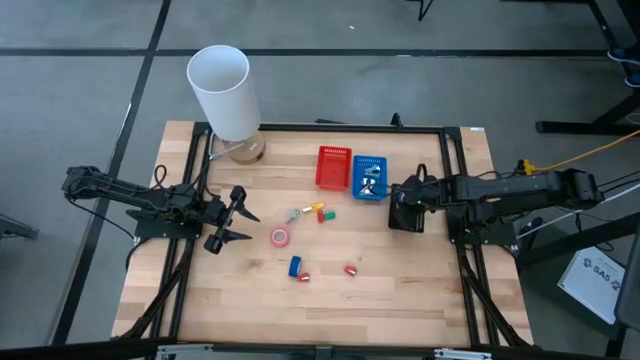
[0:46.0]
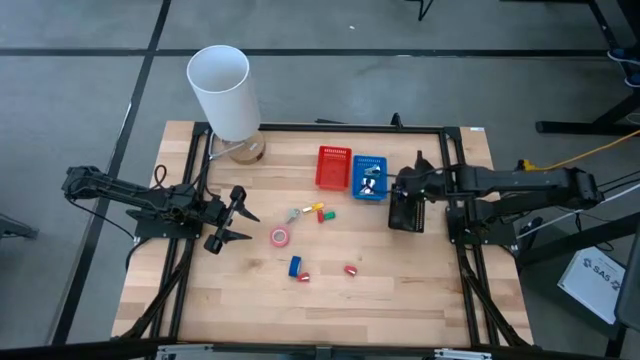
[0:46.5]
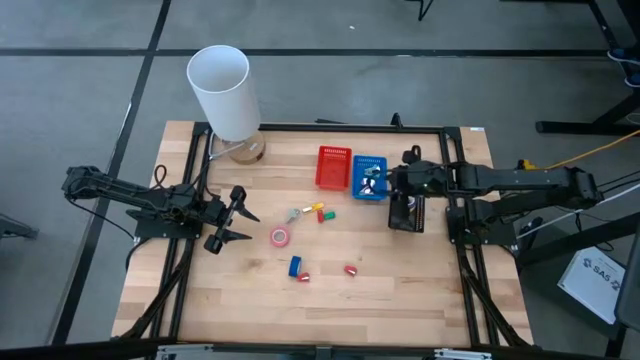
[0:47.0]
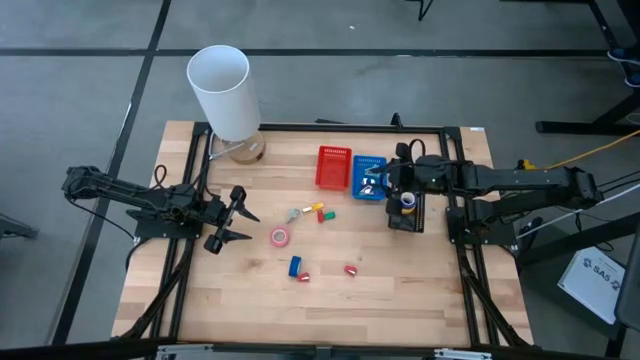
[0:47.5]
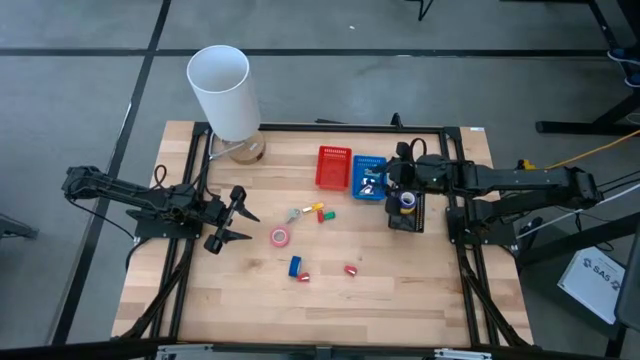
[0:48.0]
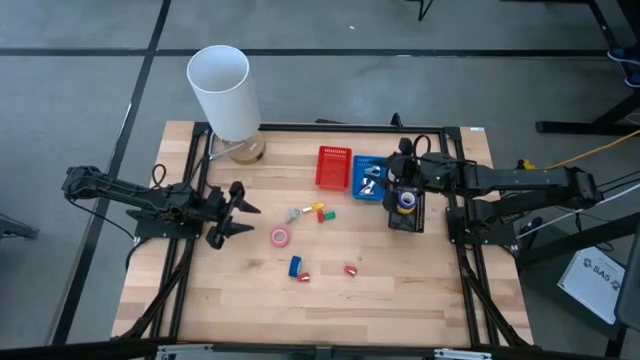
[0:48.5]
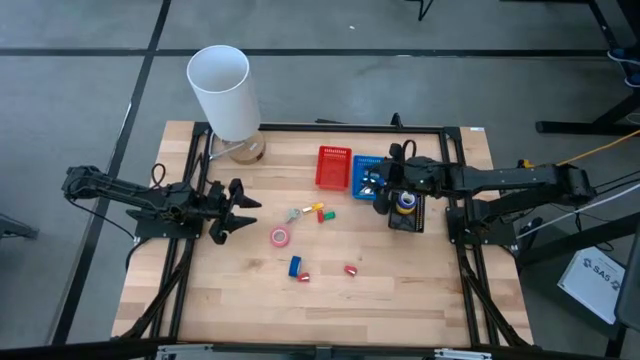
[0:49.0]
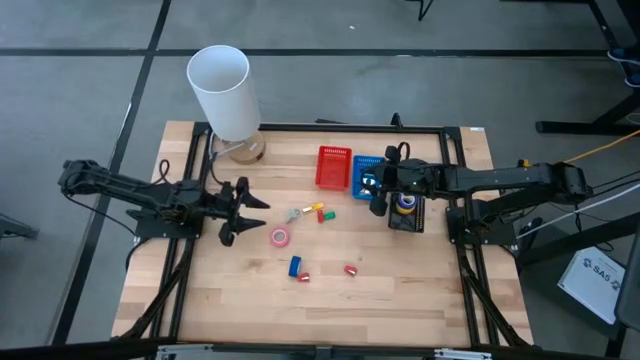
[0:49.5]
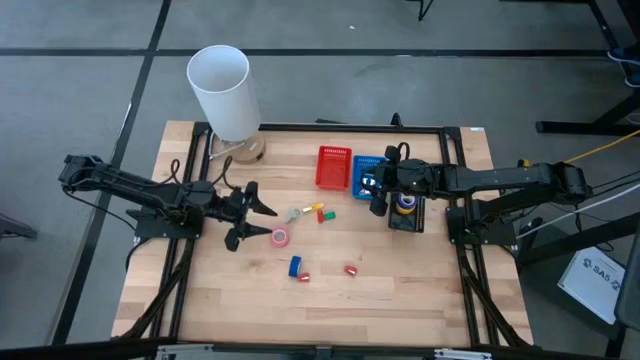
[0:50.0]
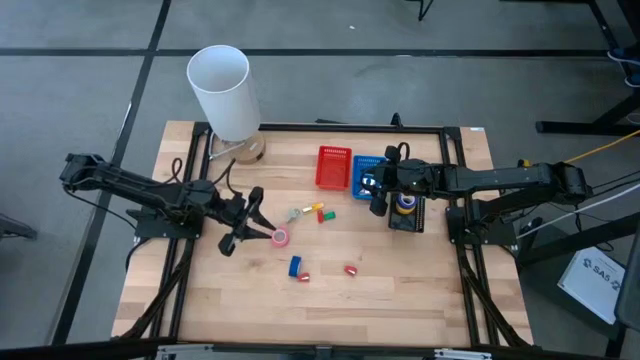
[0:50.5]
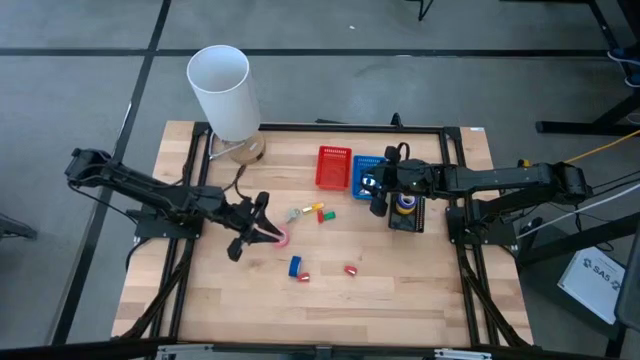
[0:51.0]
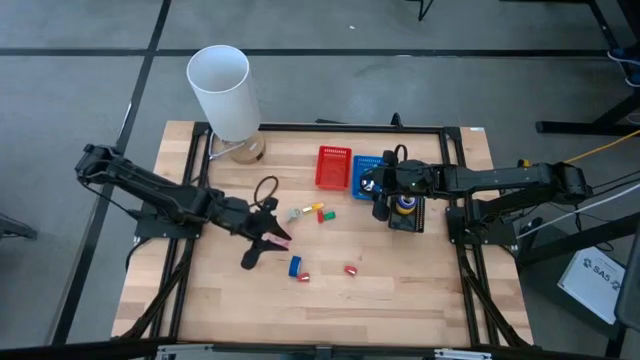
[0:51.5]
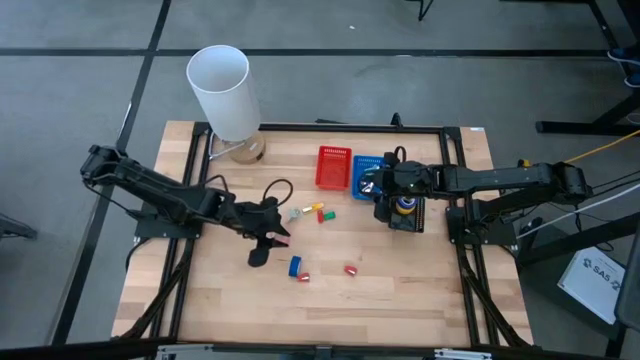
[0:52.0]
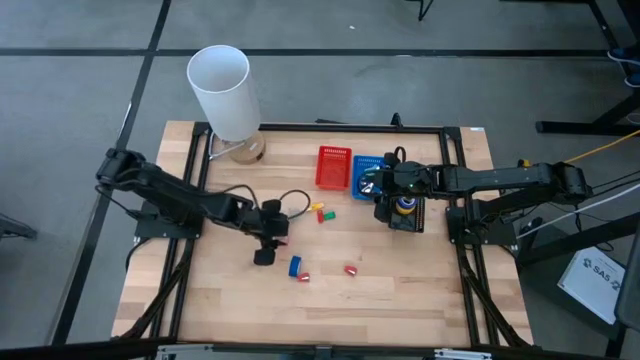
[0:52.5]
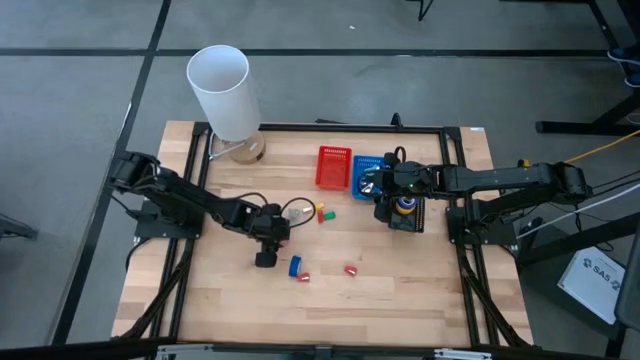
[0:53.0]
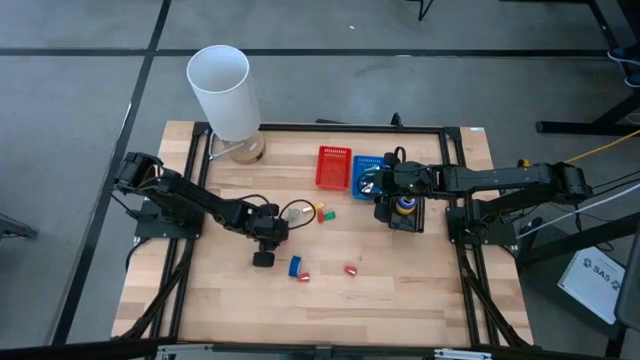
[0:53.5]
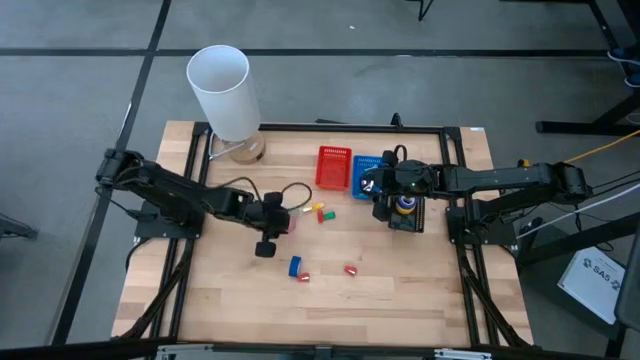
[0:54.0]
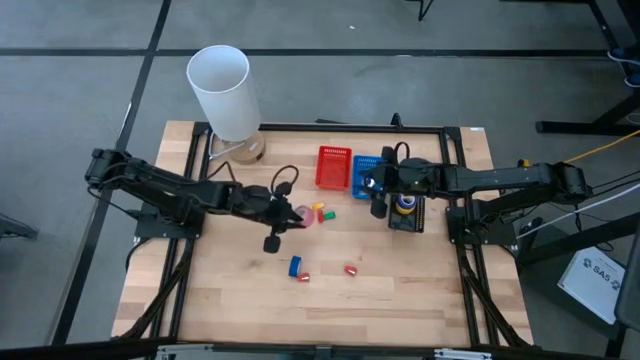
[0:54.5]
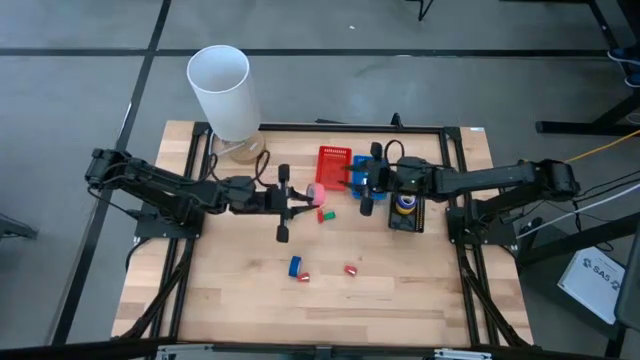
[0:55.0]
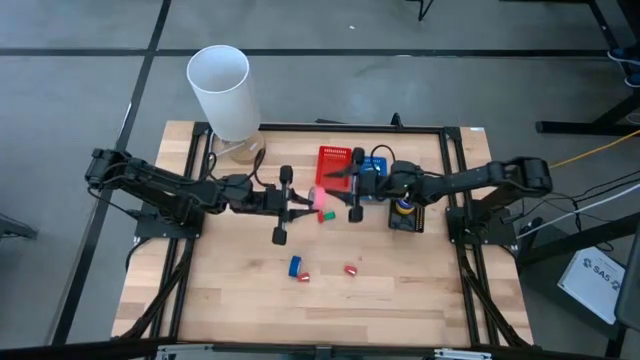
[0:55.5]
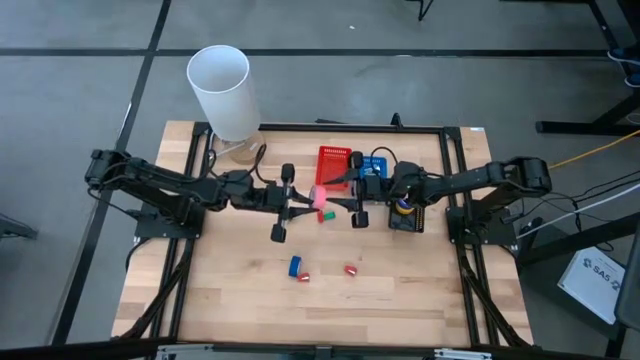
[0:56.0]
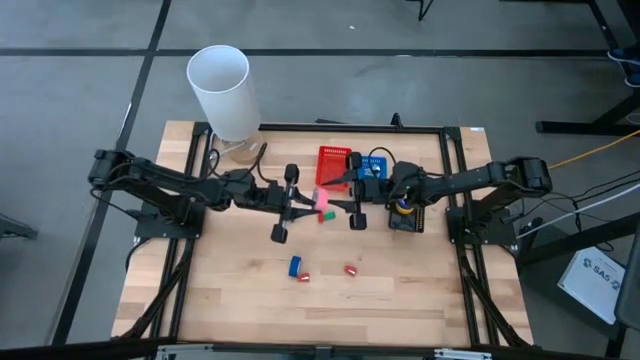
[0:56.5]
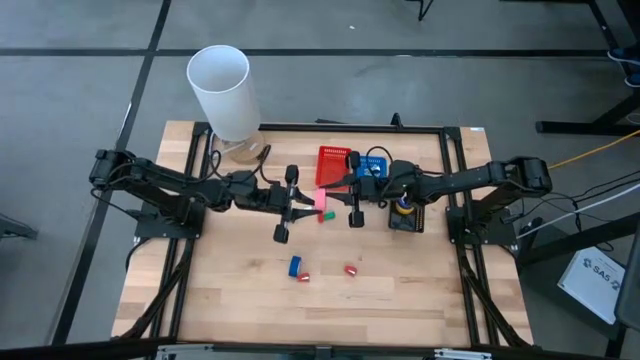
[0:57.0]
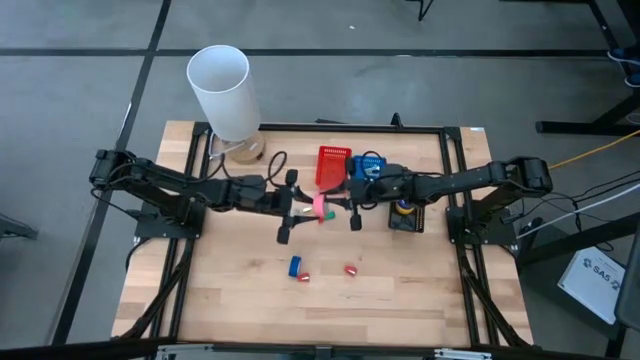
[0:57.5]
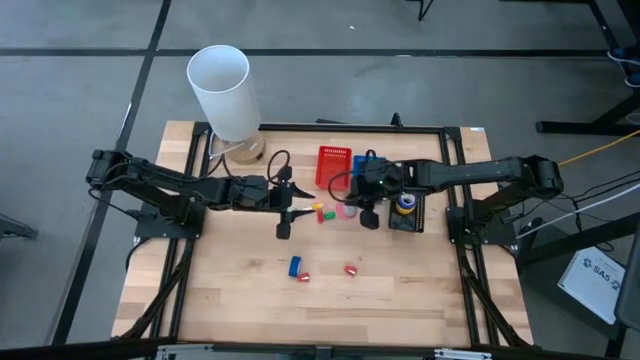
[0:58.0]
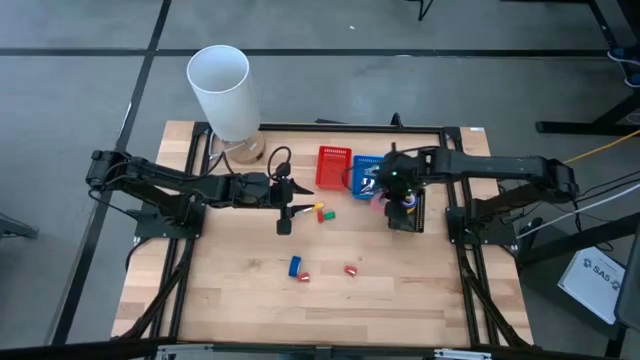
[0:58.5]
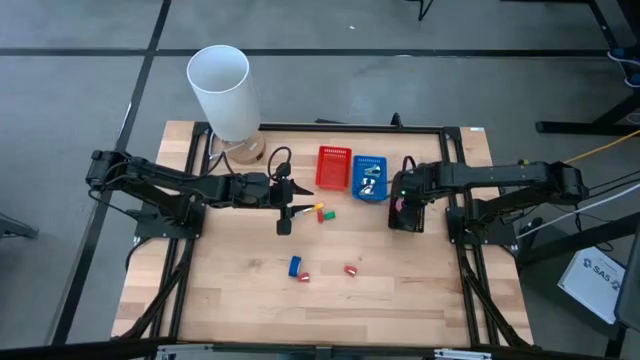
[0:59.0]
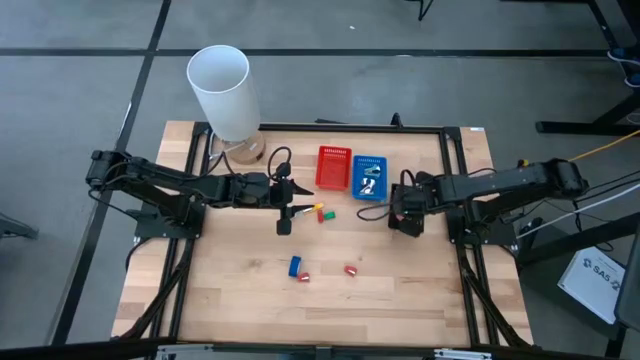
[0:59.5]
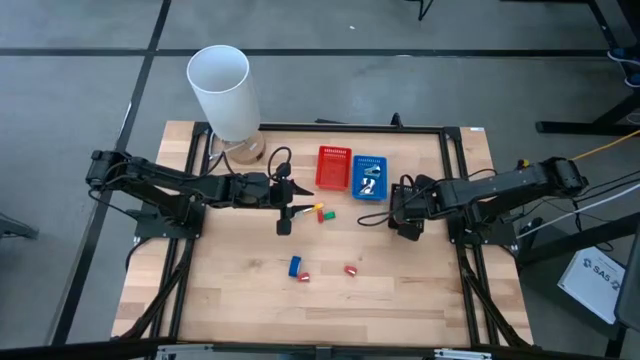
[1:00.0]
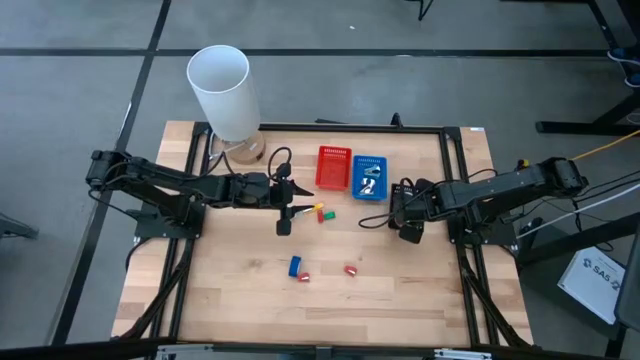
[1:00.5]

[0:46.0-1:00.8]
Task: Pick and place Stapler, Stapler remover, tape
Put the pink tape into the black bin

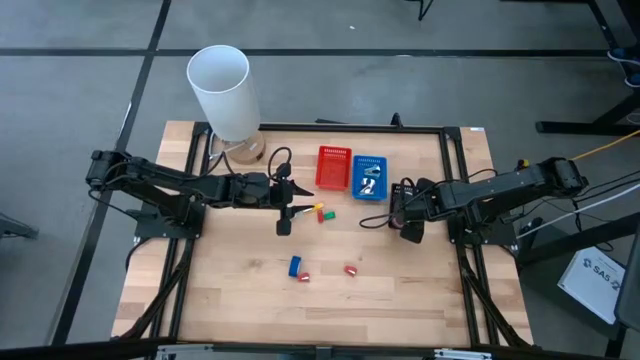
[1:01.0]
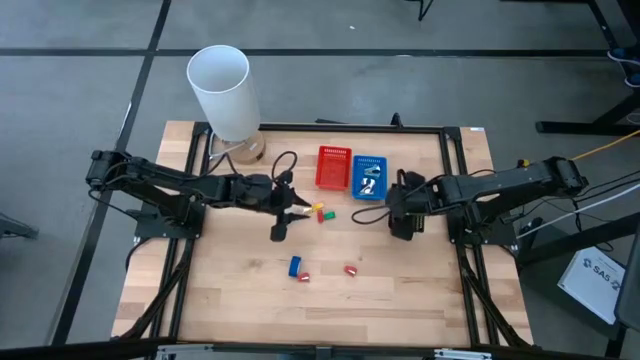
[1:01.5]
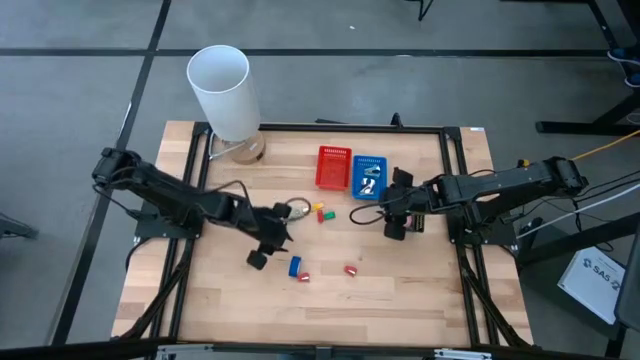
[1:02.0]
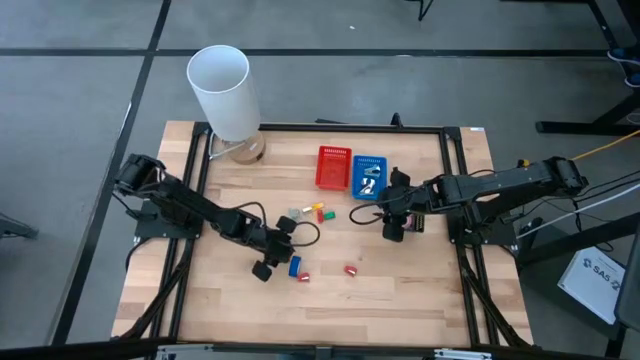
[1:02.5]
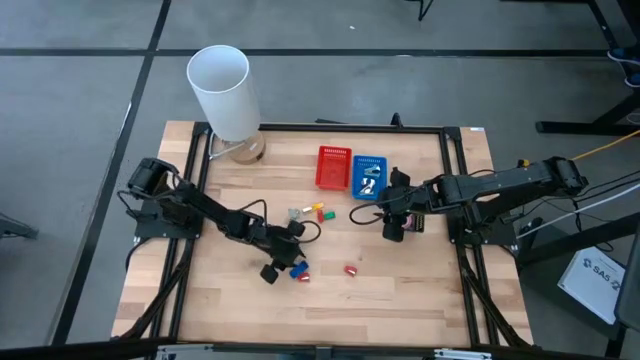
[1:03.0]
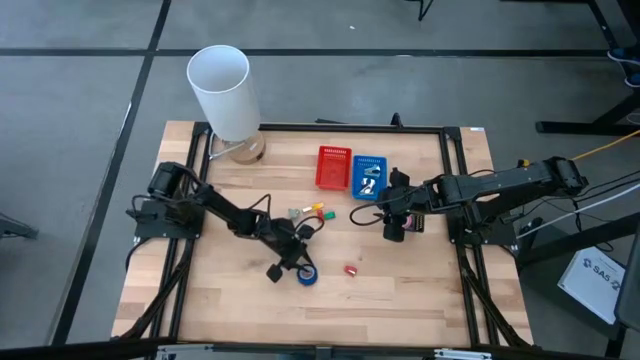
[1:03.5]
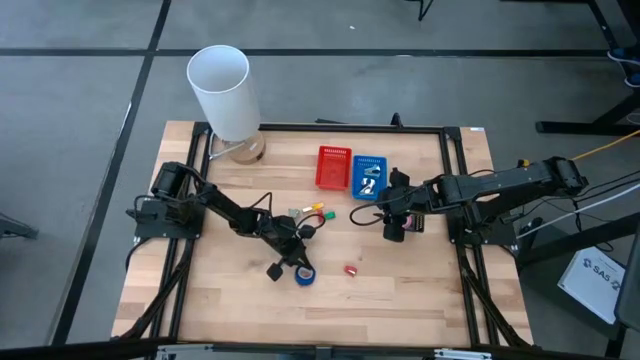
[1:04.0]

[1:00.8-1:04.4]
Put the blue tape into the black bin
